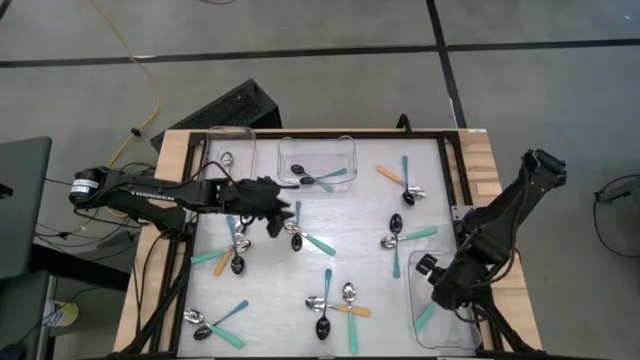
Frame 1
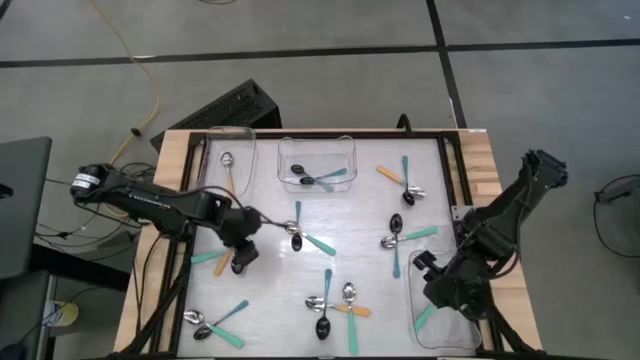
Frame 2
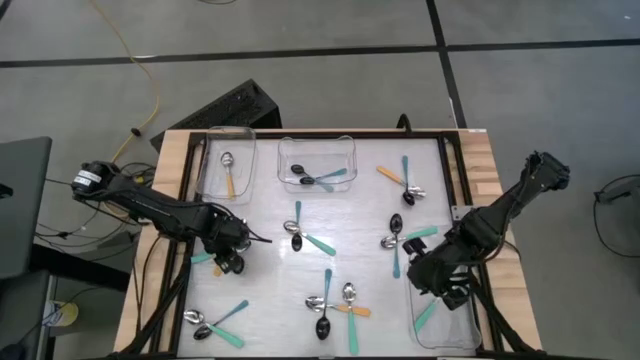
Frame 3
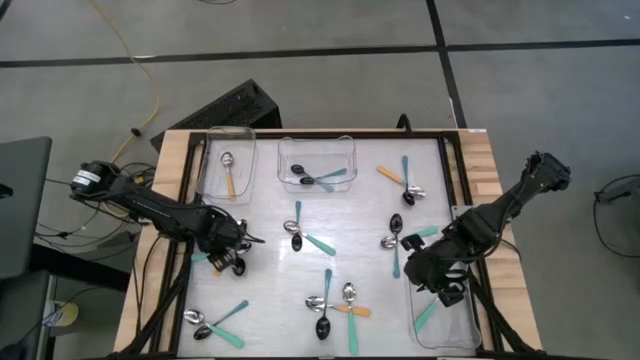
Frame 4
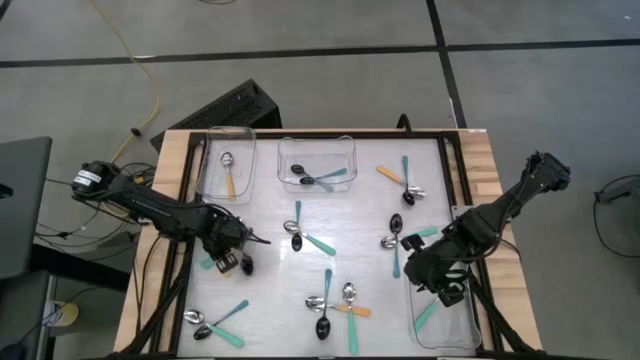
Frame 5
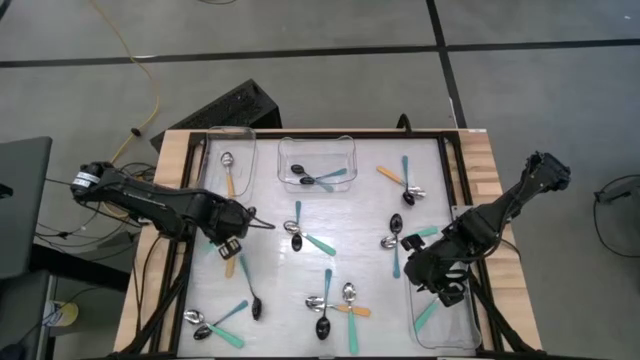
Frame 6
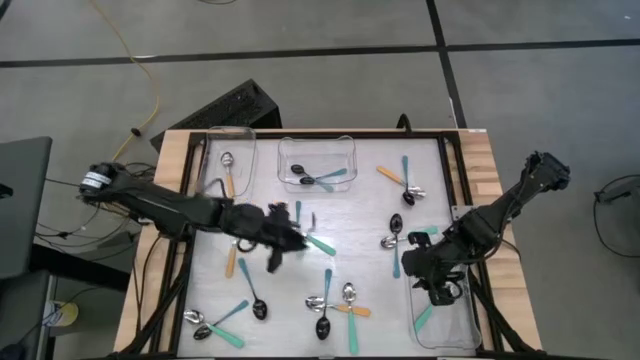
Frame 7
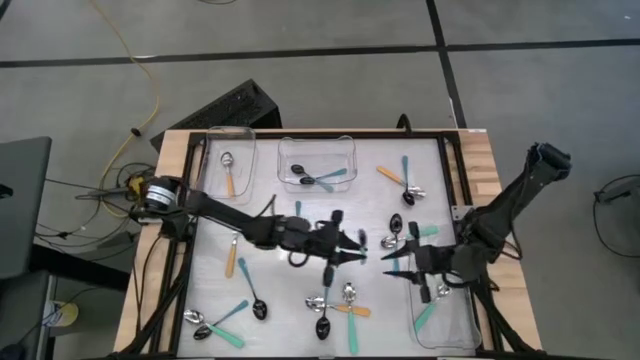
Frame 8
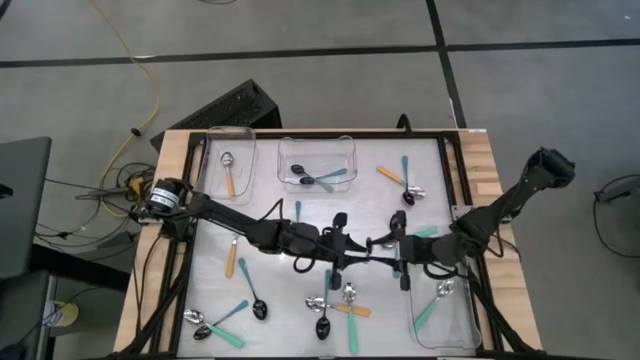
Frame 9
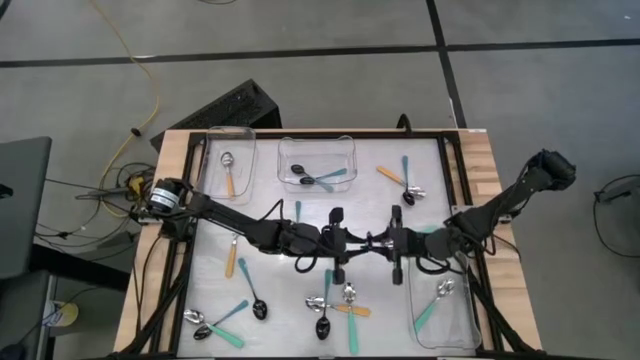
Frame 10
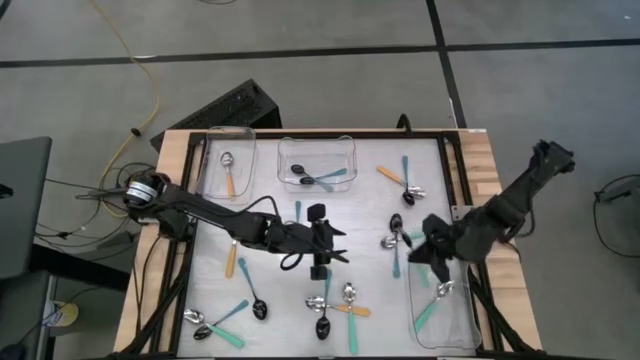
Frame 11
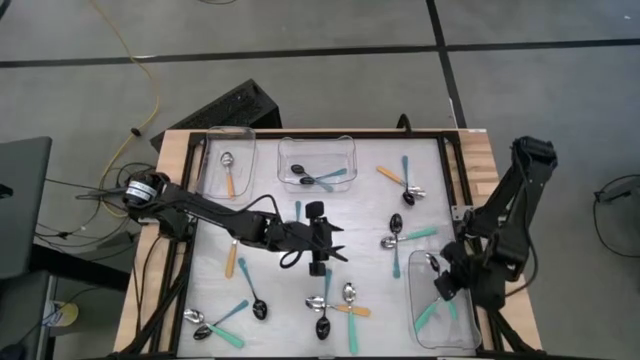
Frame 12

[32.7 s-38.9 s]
Task: Sort silverware by color (type)
Put the green spoon into the bottom transparent bin

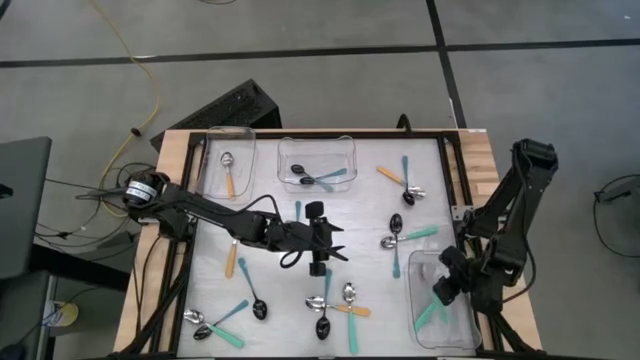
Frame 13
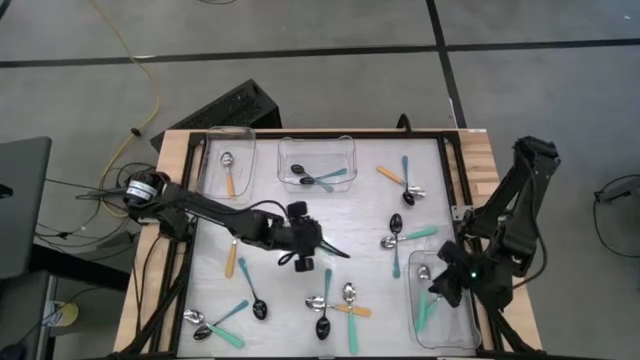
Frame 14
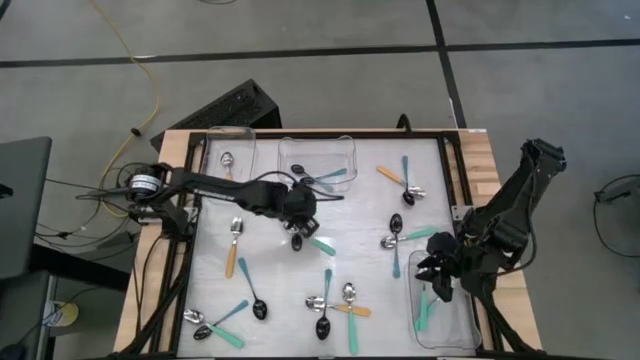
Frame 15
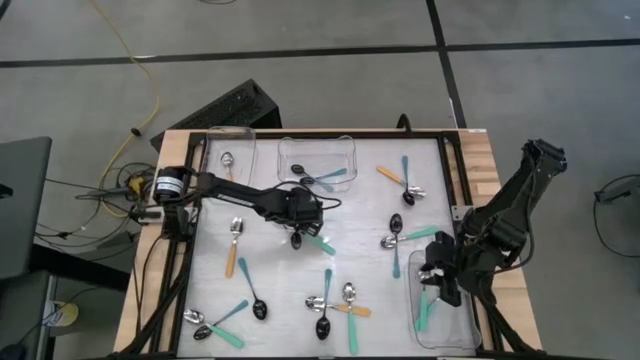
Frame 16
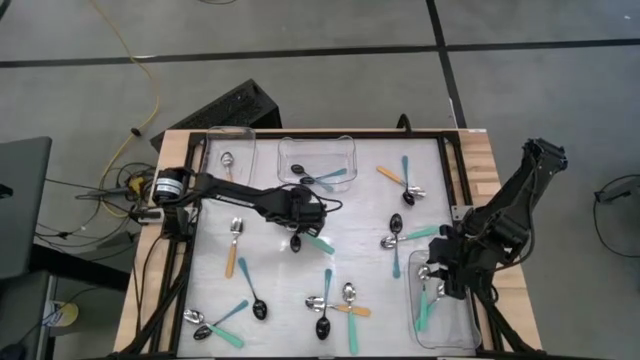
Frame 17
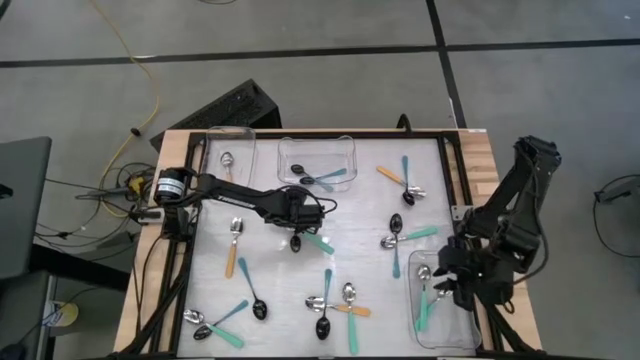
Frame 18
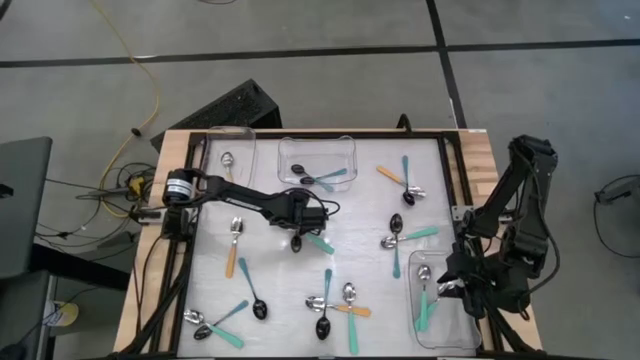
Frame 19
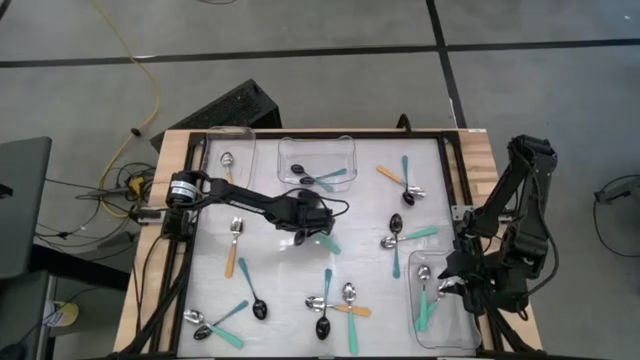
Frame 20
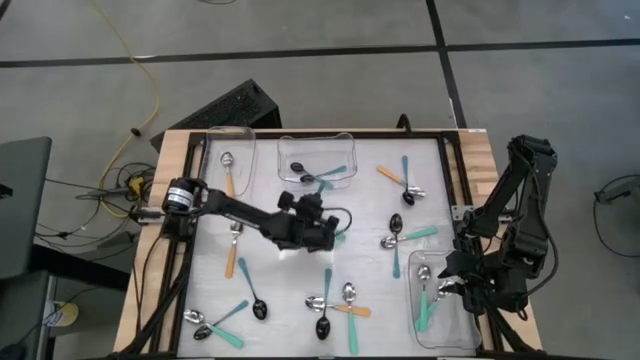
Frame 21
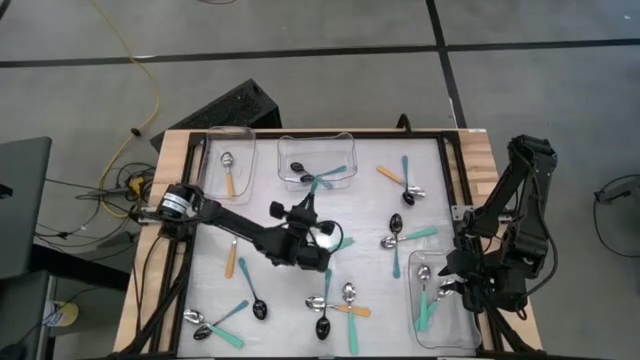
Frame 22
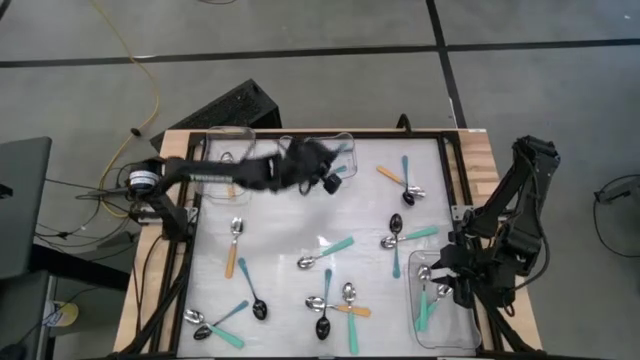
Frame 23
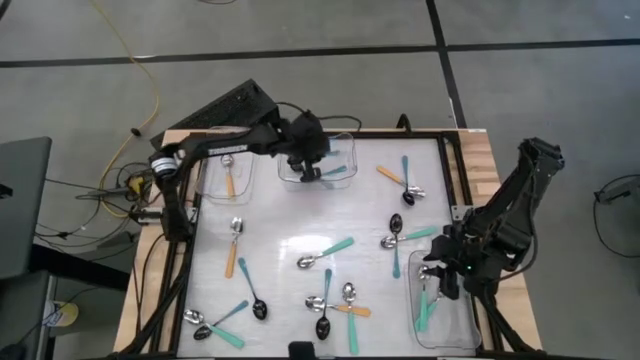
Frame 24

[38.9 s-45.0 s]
Put the blue spoon into the top middle transparent bin

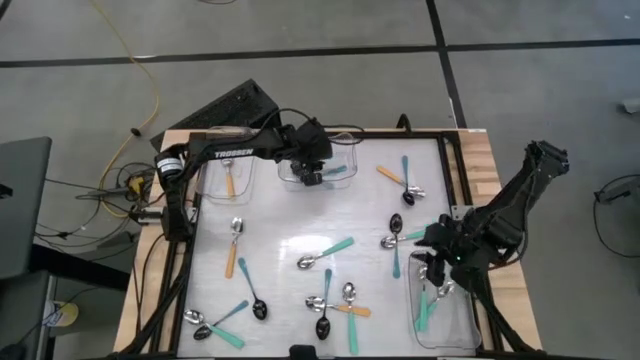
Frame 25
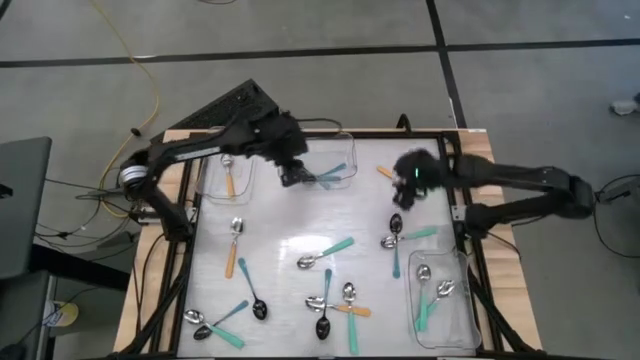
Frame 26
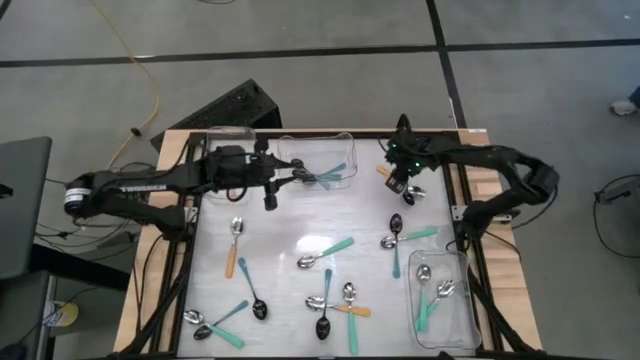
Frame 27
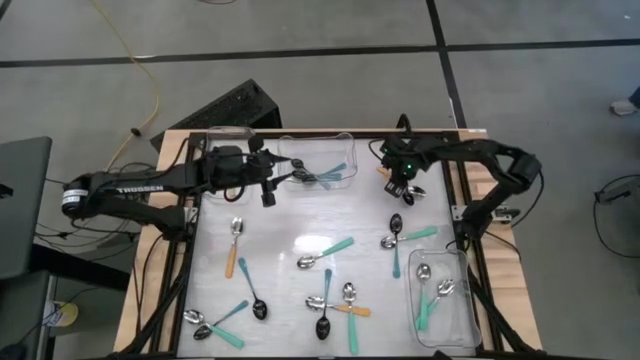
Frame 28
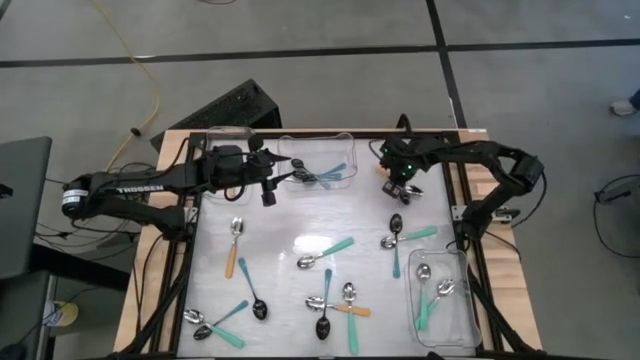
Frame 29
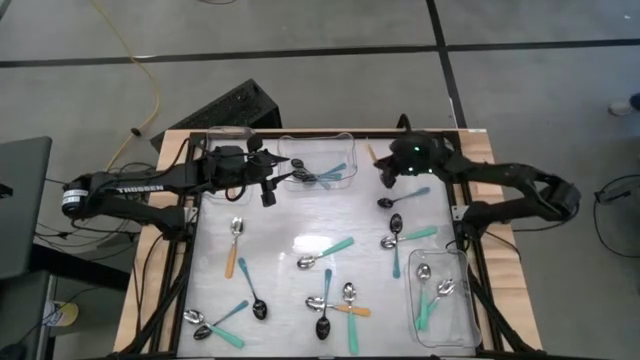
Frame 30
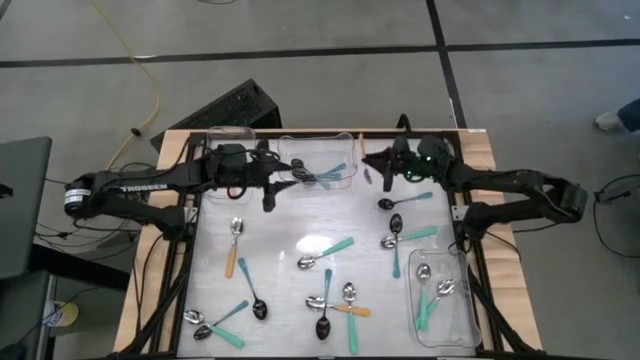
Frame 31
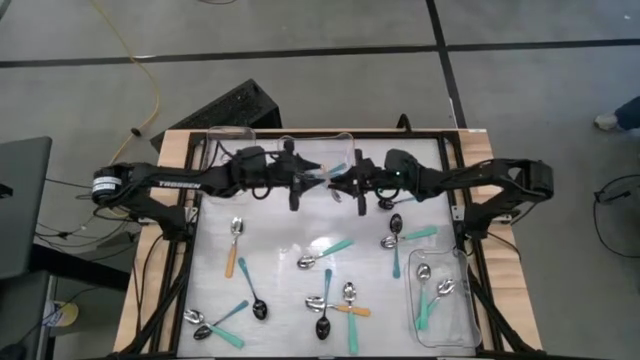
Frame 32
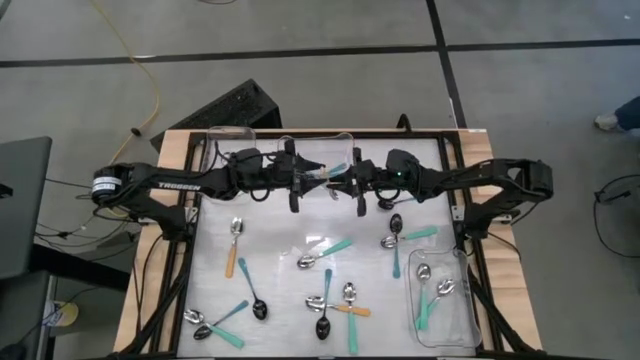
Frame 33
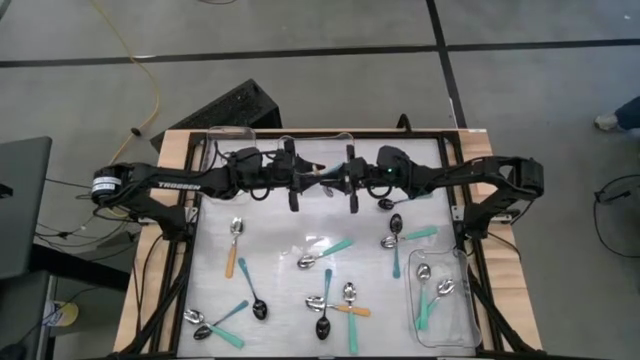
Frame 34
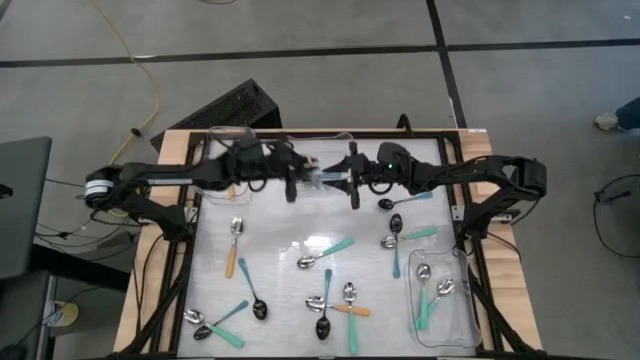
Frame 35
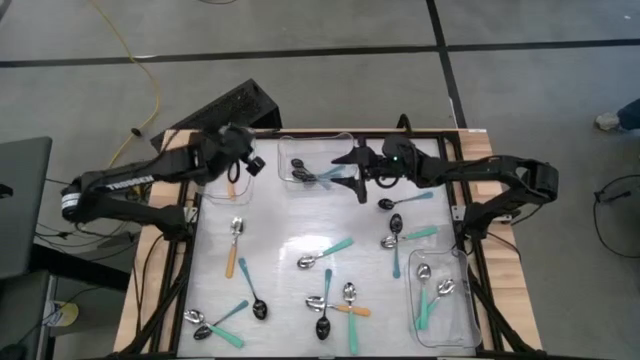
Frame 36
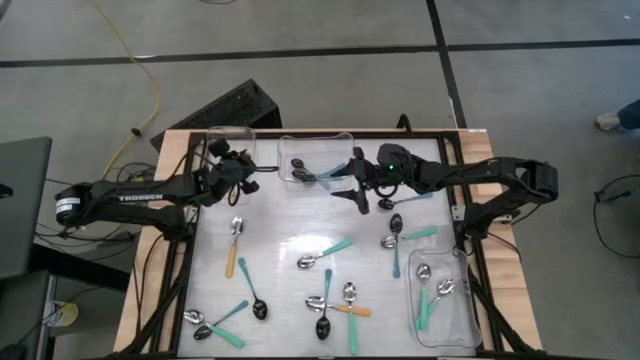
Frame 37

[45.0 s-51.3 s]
Put the yellow spoon into the top left transparent bin

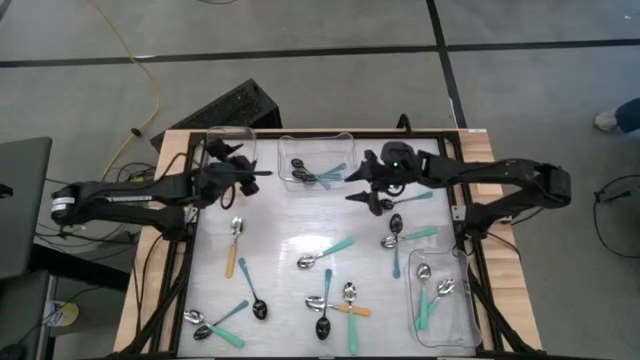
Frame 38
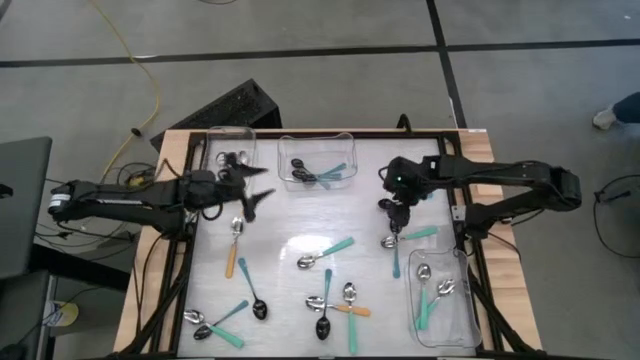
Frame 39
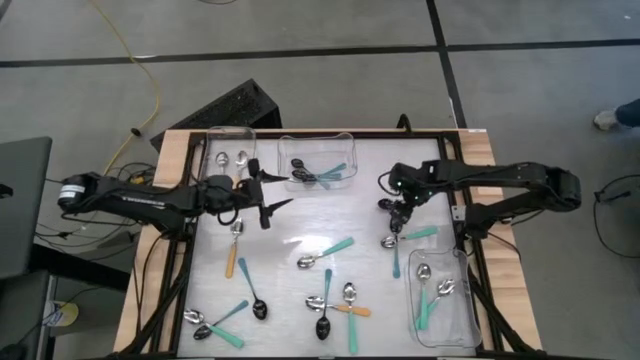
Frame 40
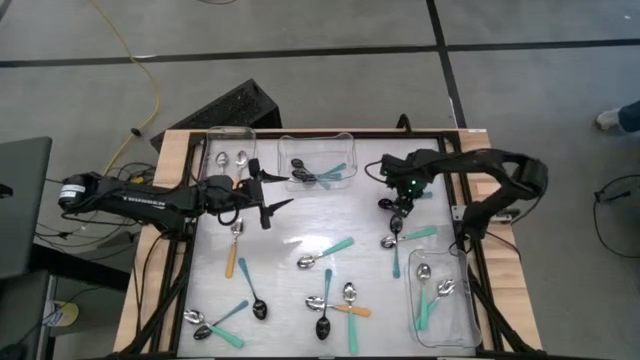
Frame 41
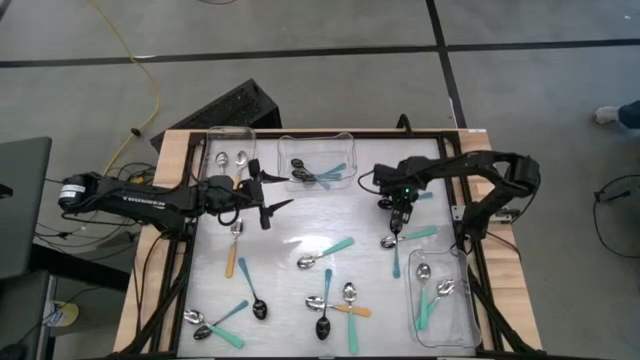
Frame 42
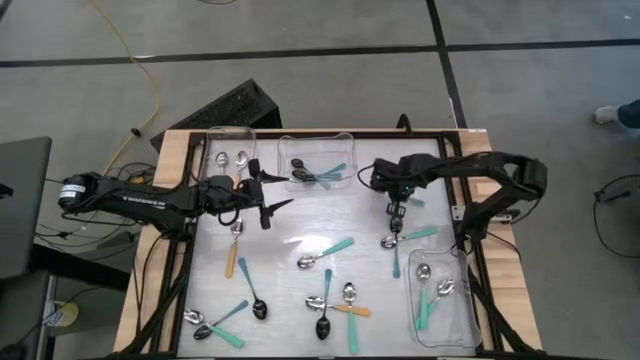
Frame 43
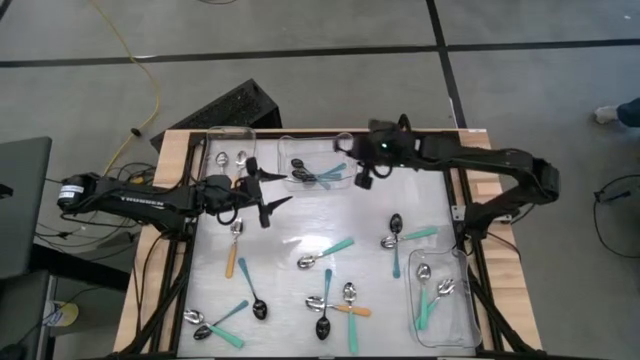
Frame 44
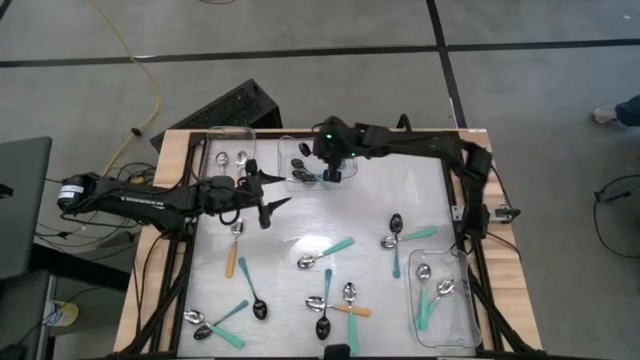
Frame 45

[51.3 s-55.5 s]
Put the blue spoon into the top middle transparent bin
